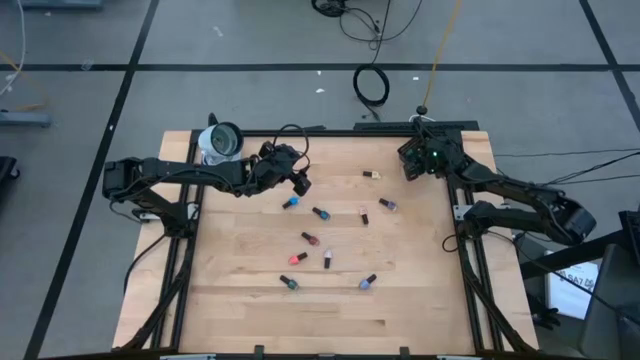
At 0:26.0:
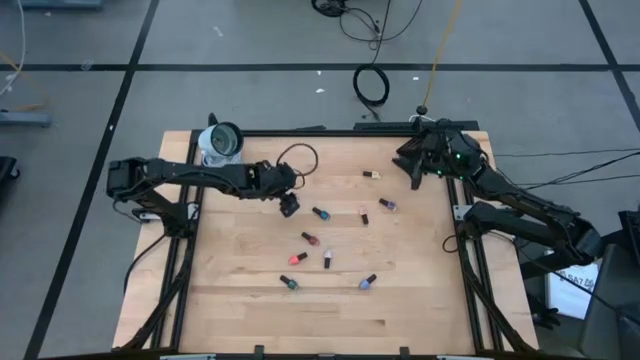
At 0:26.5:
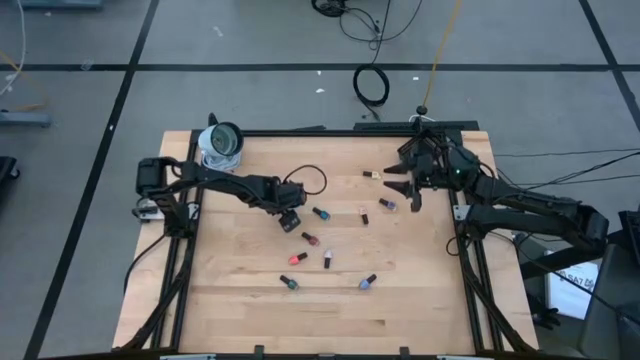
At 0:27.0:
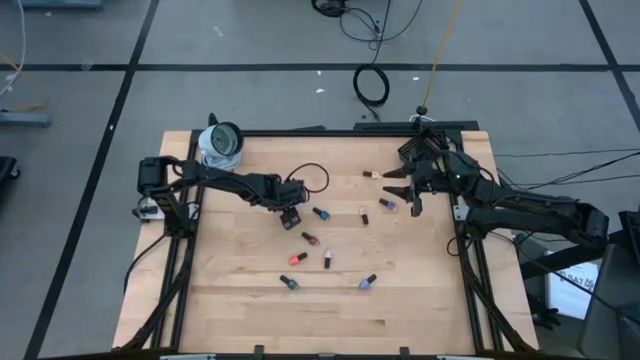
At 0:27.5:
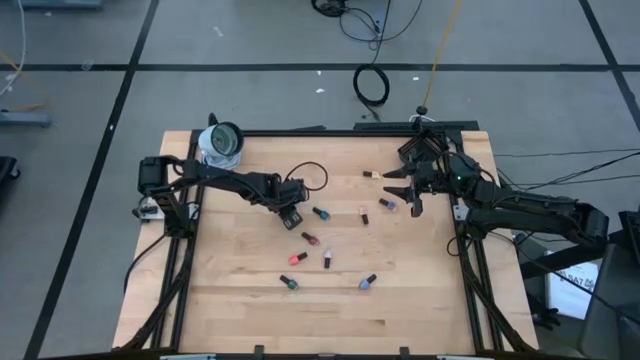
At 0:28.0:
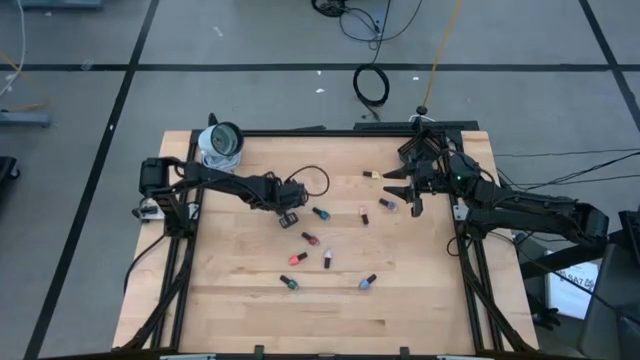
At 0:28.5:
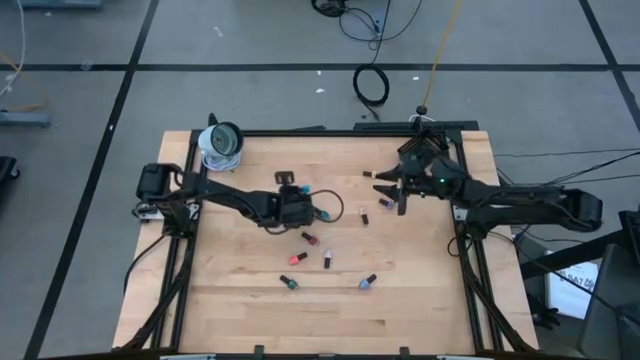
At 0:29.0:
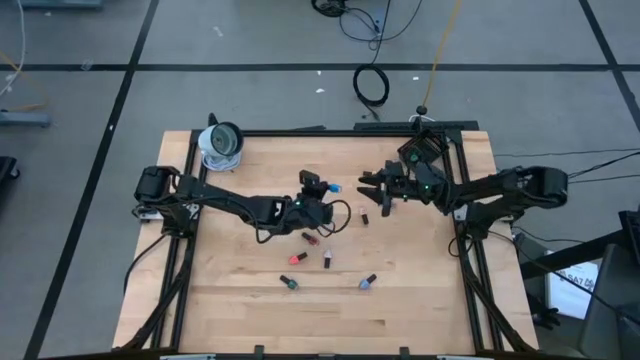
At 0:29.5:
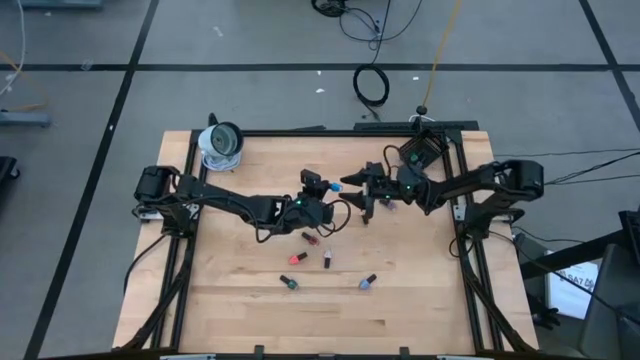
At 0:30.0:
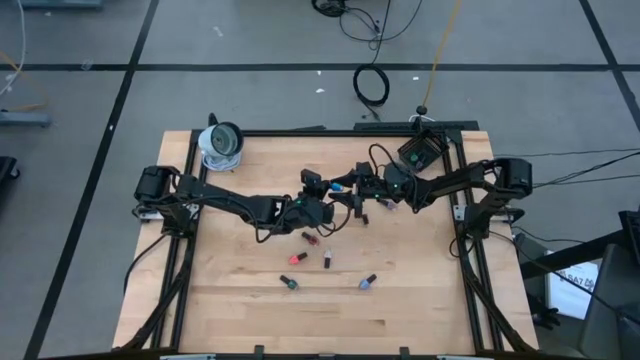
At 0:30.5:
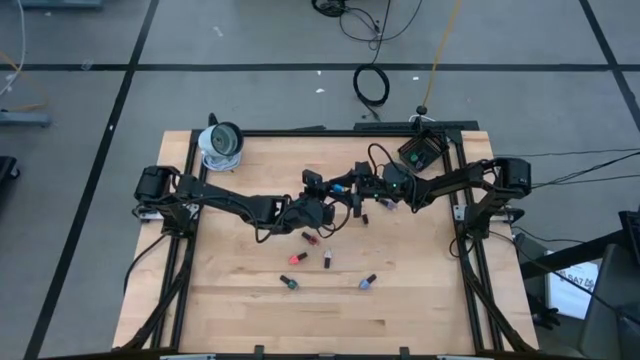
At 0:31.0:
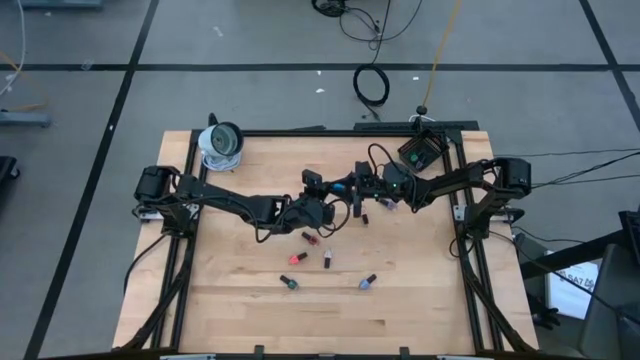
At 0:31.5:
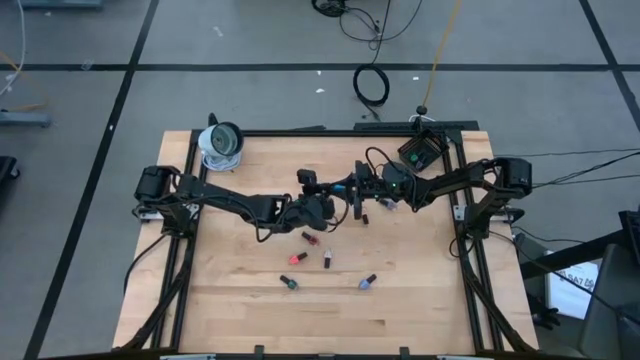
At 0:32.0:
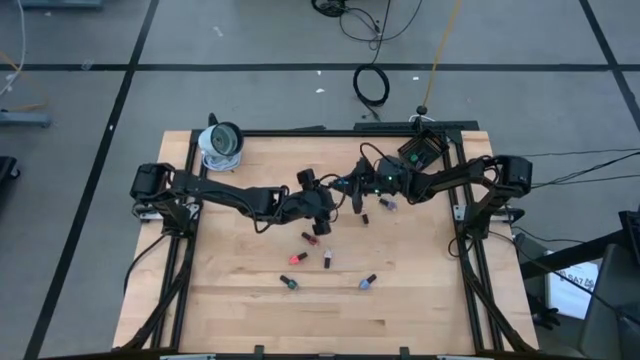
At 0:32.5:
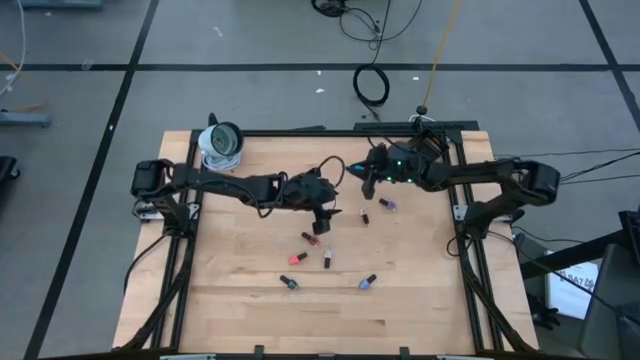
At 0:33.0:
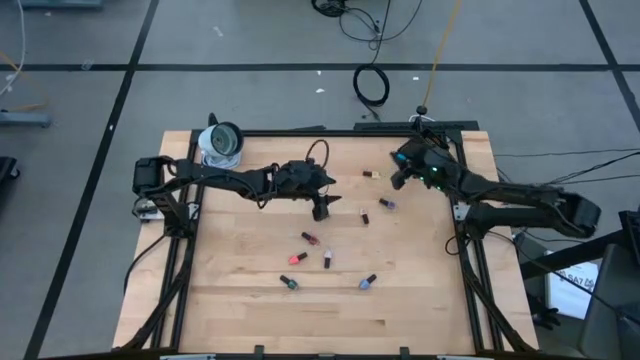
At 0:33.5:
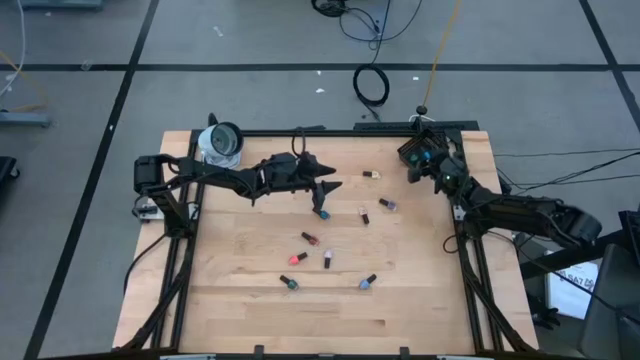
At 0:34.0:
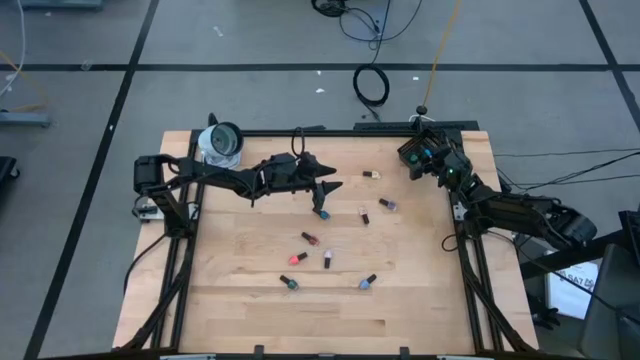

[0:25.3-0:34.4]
Task: Pick & Place Nail Polish
Put the blue nail polish into the black bin

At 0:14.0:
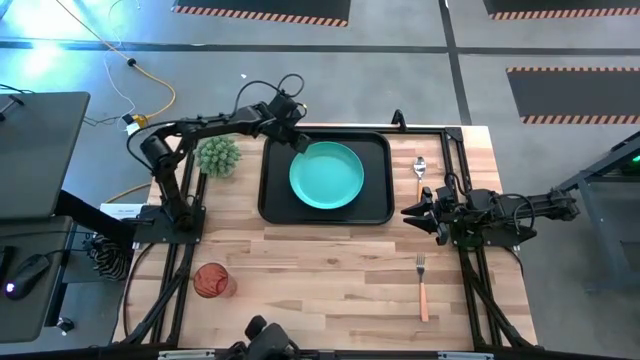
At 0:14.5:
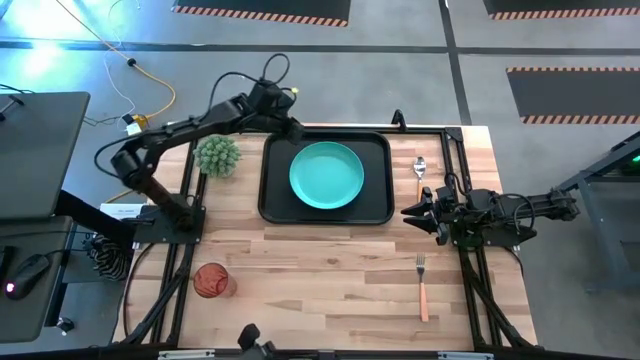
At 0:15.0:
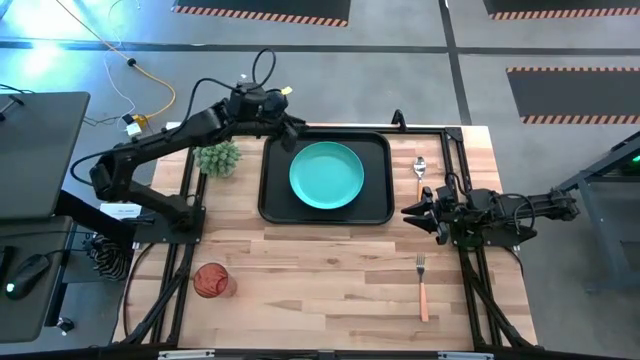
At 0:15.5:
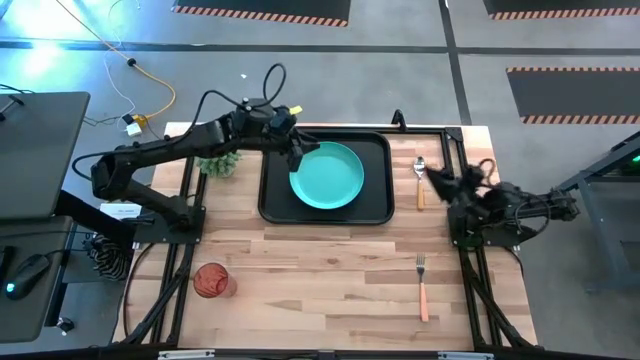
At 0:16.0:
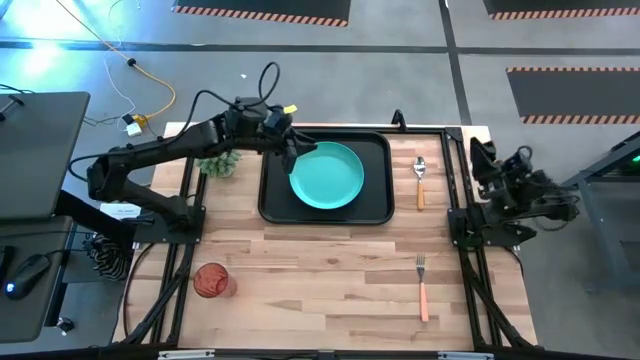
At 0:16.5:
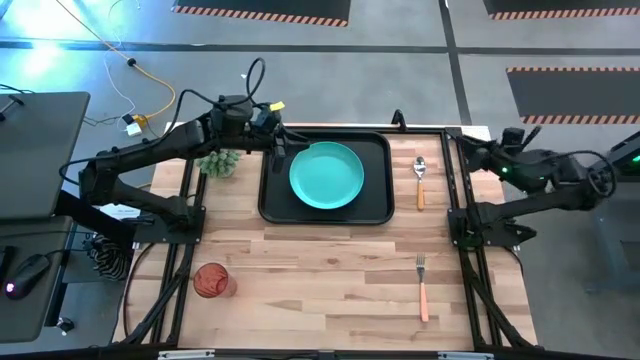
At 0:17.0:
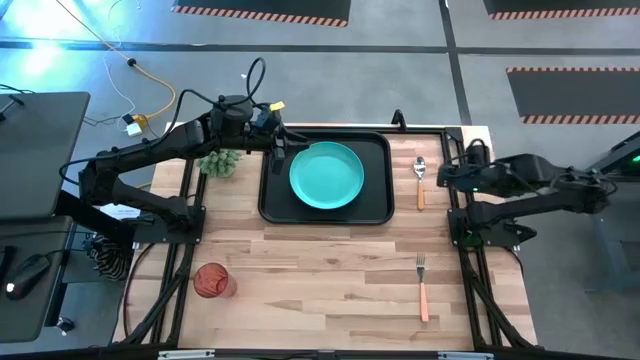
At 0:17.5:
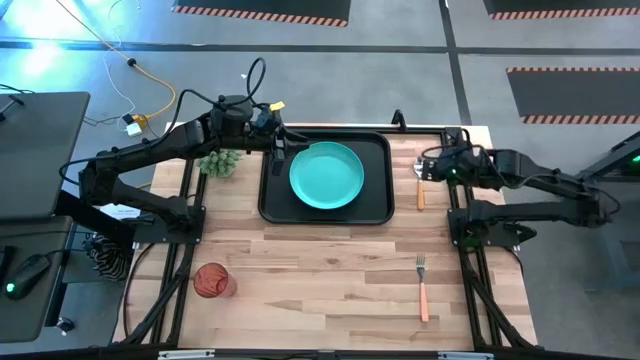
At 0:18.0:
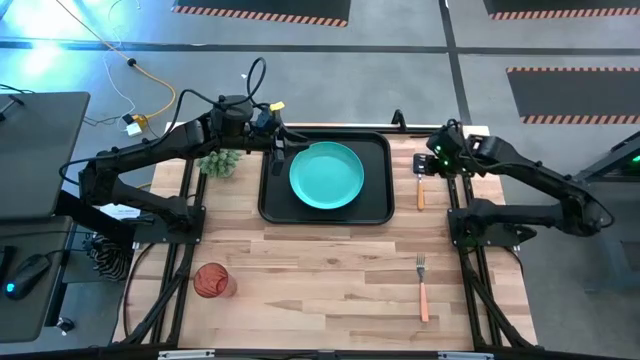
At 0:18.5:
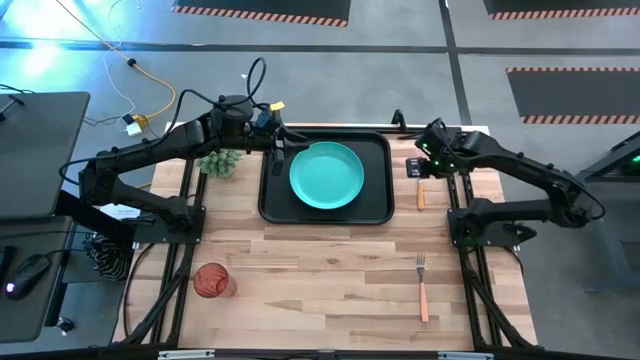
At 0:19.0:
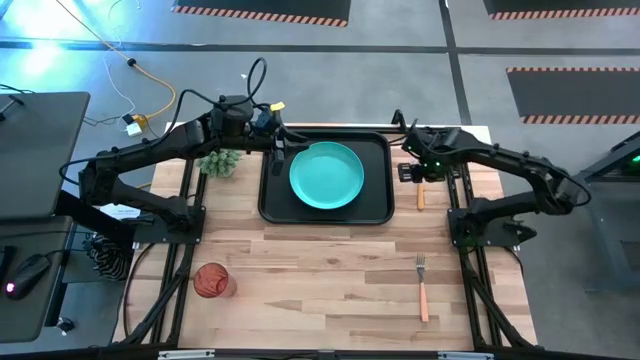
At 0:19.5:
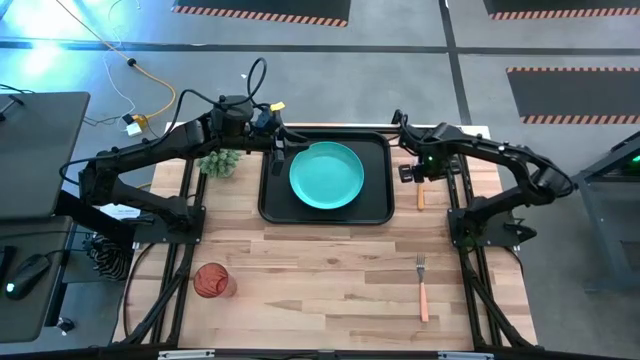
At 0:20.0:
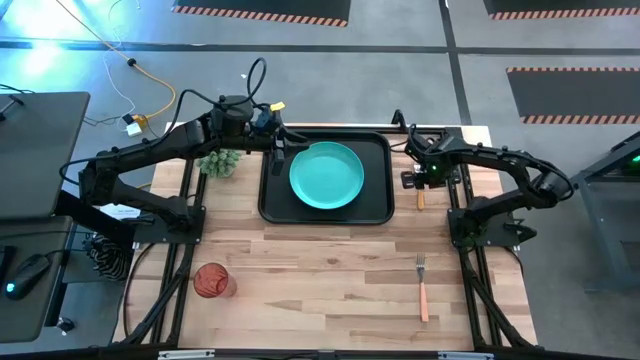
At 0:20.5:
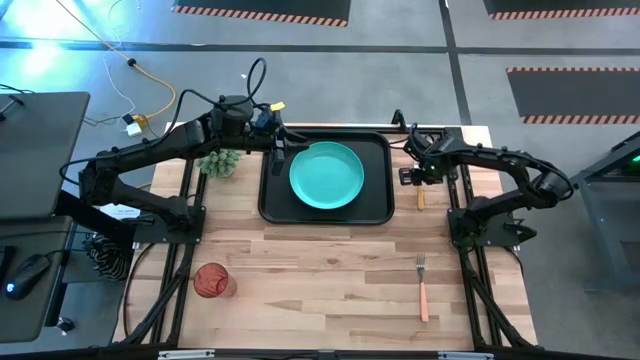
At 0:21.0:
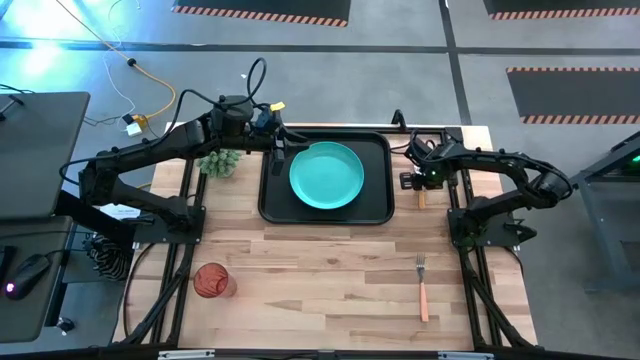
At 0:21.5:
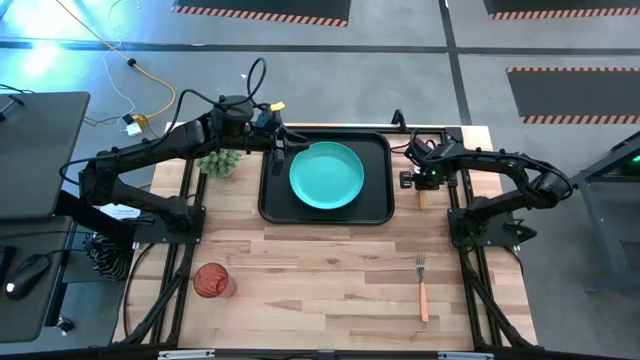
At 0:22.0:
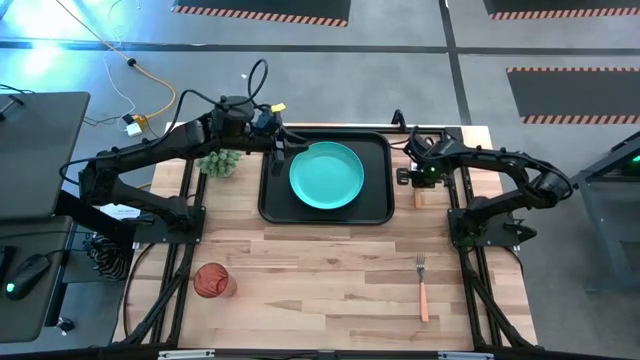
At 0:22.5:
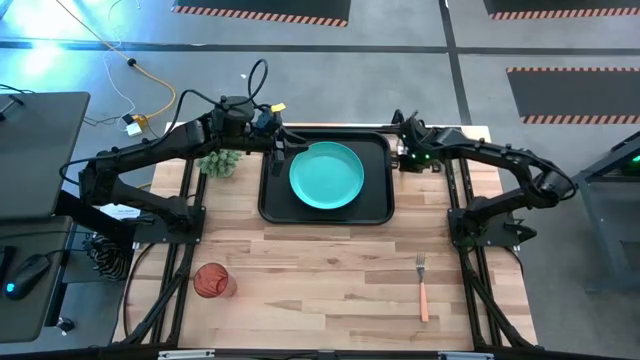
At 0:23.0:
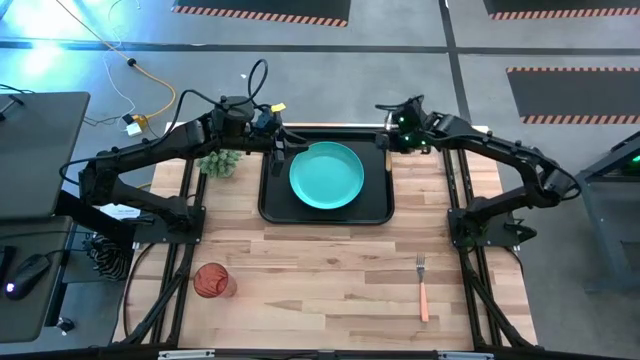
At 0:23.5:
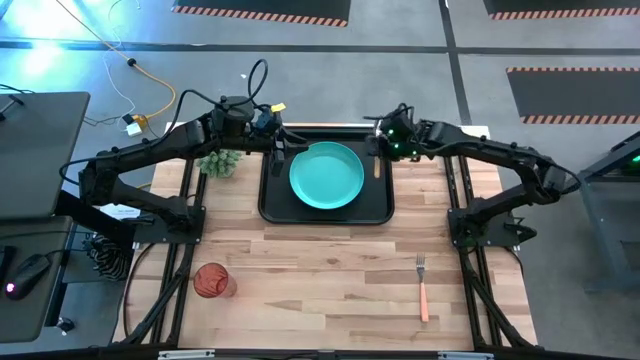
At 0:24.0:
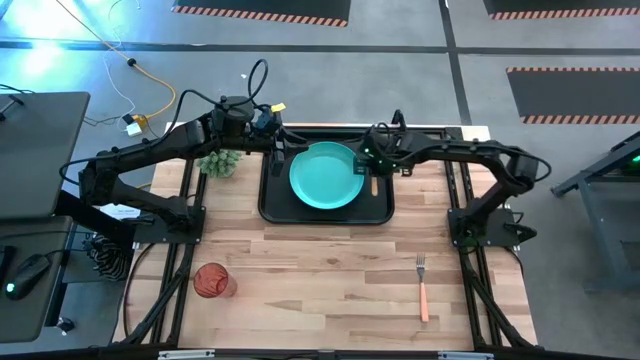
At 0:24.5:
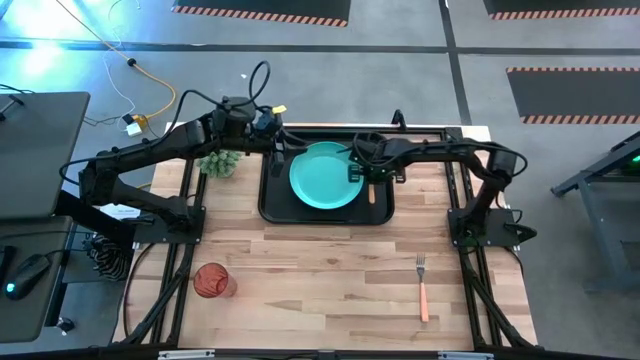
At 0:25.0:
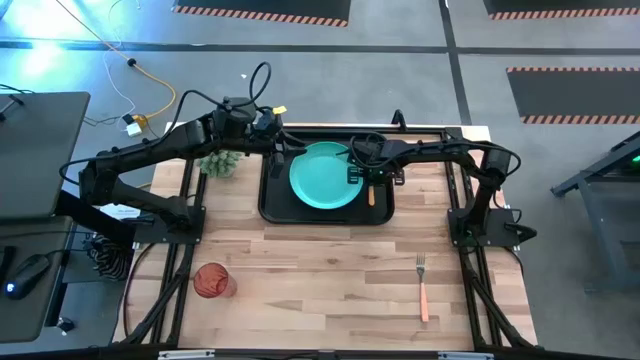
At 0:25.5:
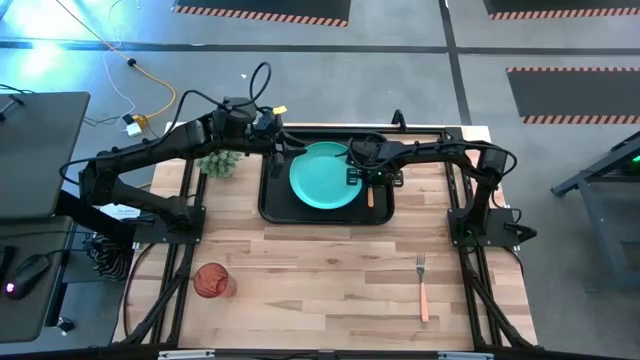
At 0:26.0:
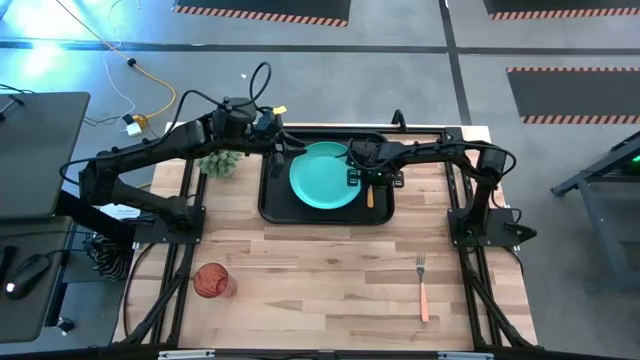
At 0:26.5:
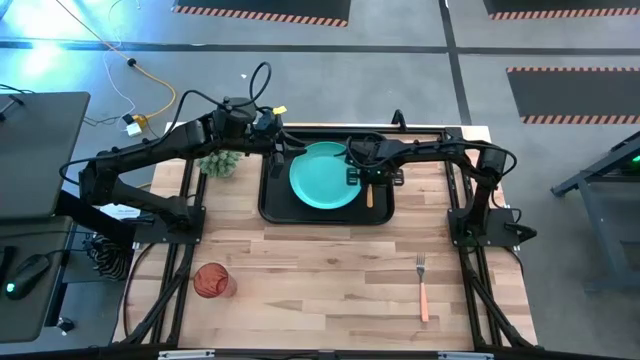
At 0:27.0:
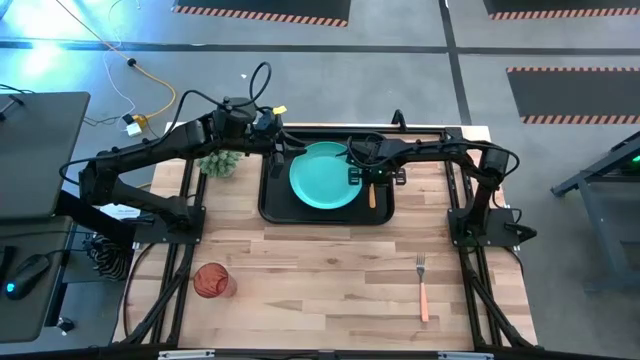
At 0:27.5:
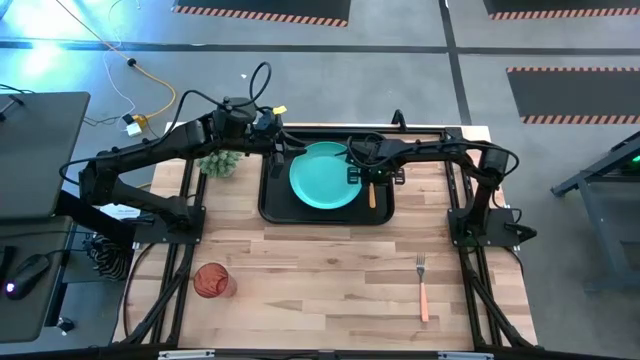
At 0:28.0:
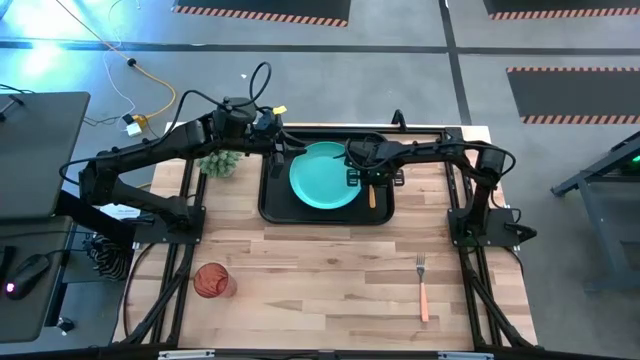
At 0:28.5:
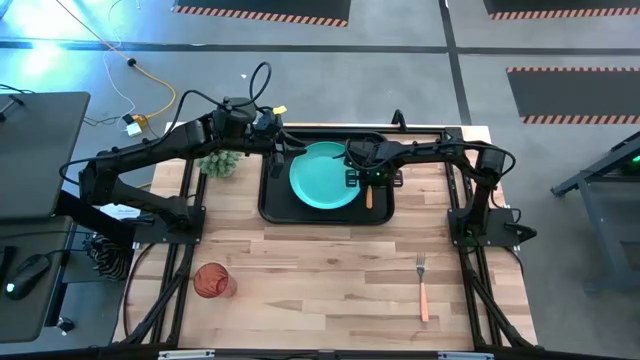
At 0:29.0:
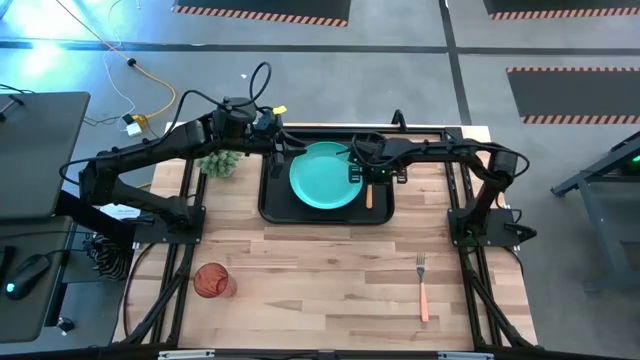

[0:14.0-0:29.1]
Task: Pick and place plate/cup/fork/spoon on tray
Put the spoon onto the black tray
